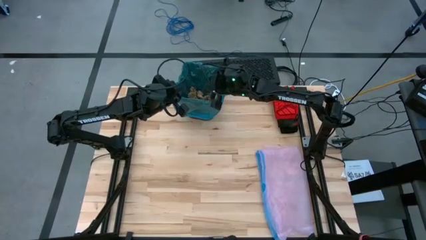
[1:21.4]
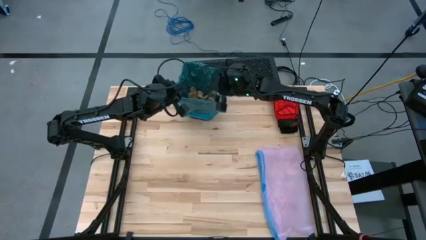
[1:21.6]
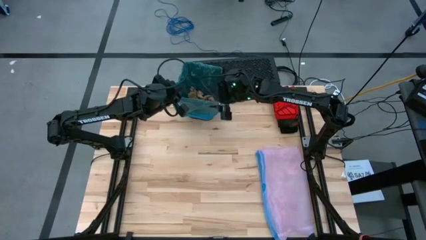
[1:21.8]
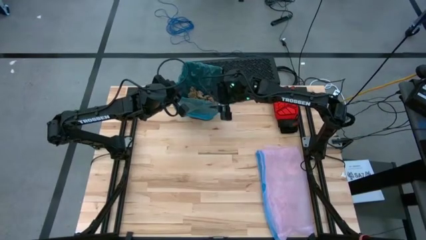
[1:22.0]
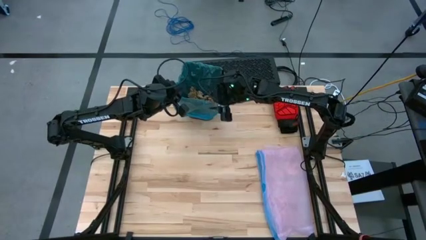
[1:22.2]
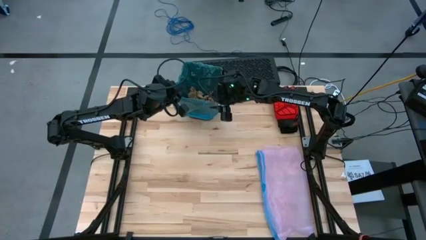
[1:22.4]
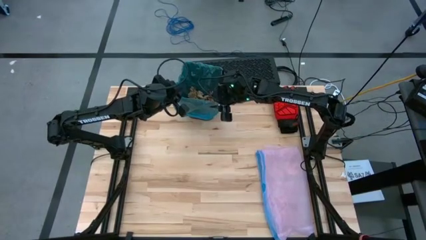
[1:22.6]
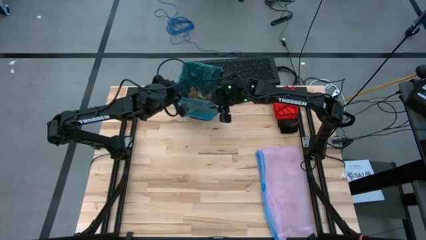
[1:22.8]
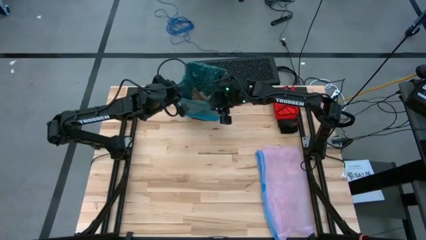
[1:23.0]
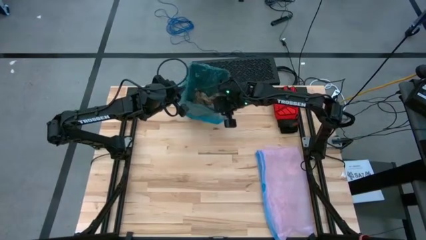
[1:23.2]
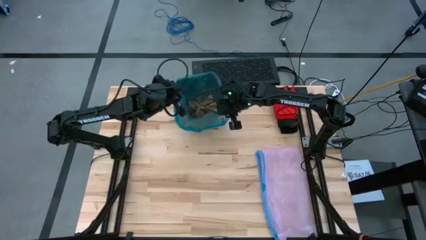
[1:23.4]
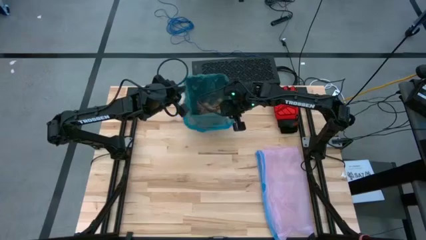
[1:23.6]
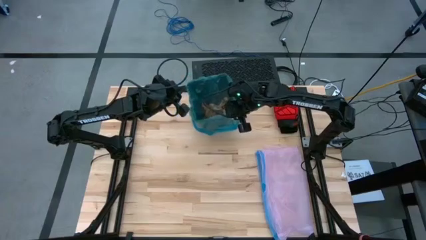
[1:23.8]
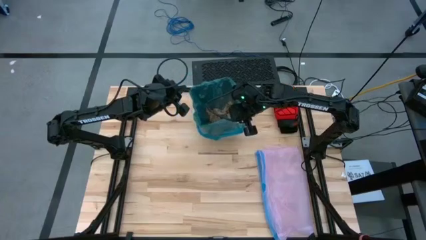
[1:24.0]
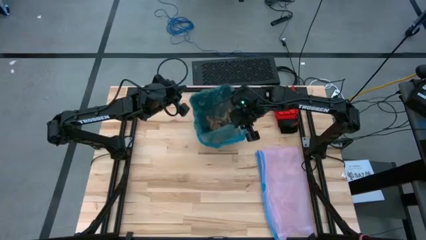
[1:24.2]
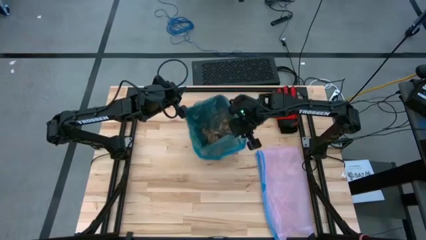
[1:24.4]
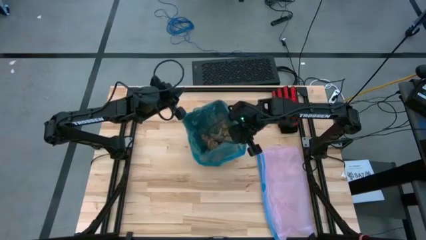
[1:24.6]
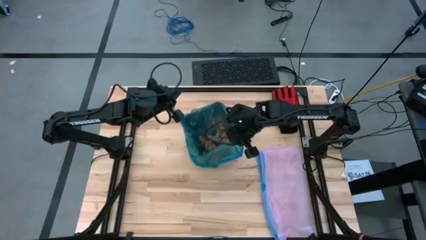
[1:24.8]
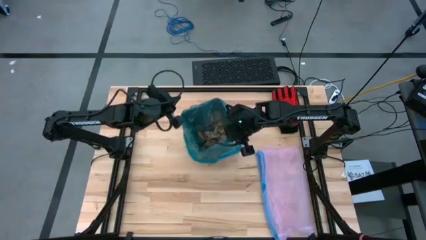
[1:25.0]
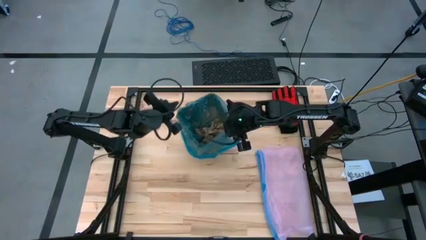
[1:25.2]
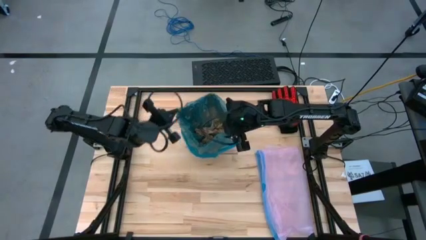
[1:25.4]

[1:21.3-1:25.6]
Task: place trash/remove bag and relplace
Move the black trash bin to the center of the table

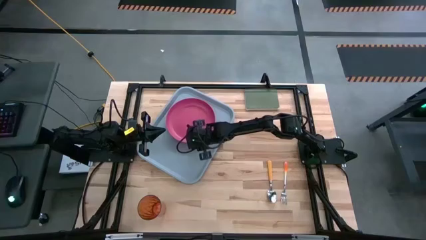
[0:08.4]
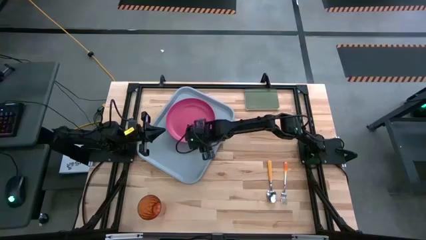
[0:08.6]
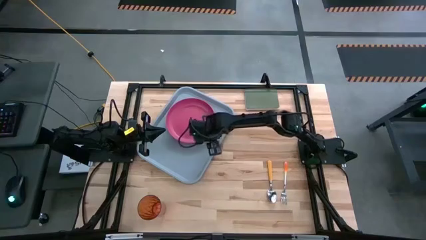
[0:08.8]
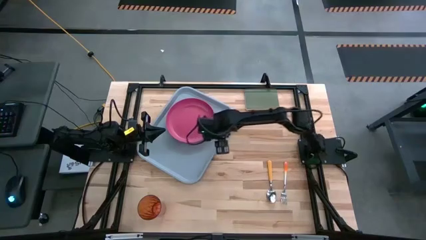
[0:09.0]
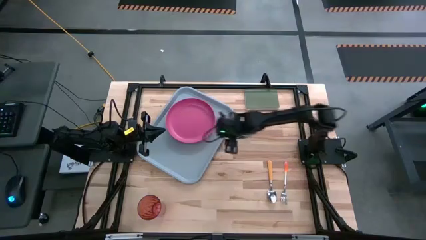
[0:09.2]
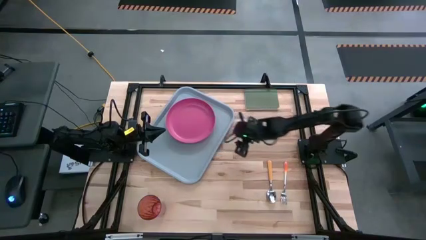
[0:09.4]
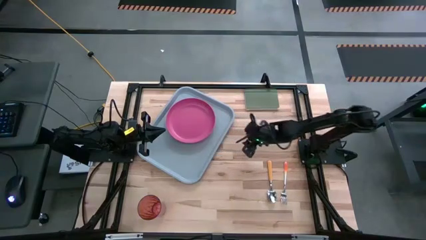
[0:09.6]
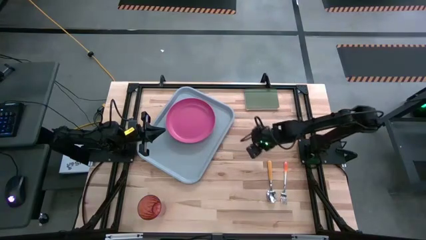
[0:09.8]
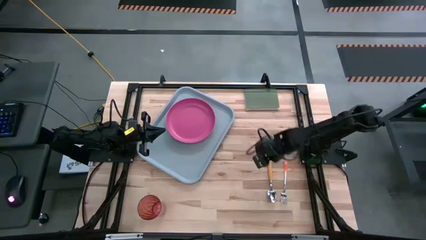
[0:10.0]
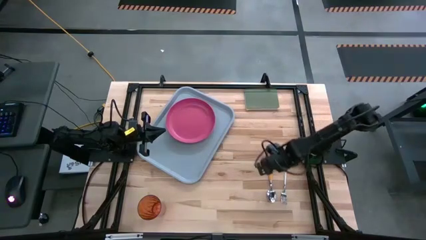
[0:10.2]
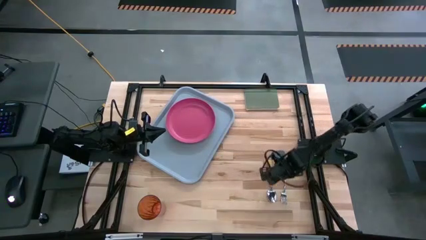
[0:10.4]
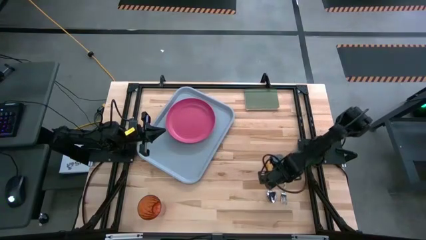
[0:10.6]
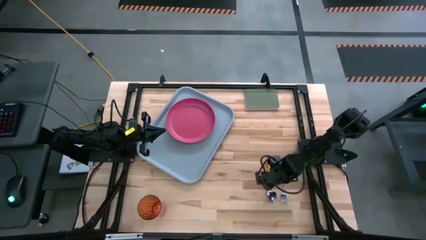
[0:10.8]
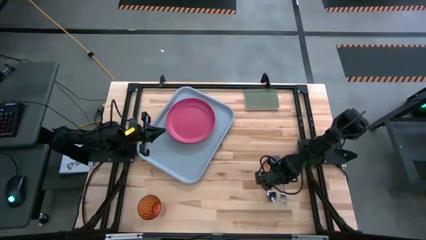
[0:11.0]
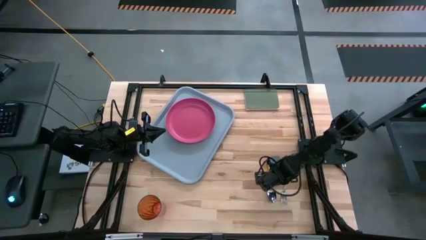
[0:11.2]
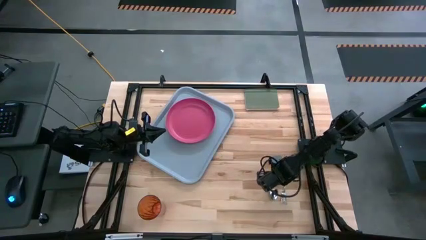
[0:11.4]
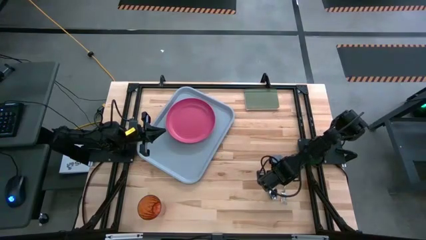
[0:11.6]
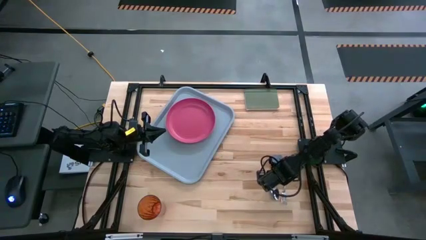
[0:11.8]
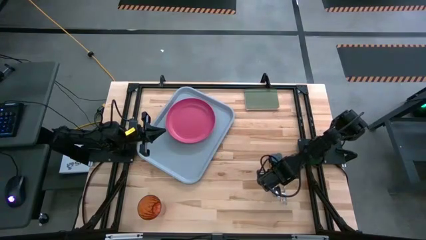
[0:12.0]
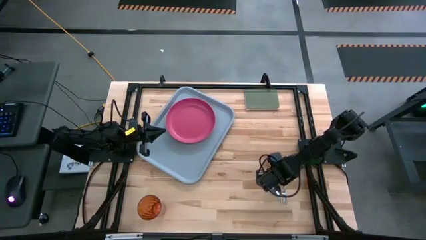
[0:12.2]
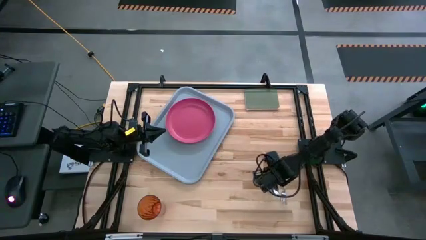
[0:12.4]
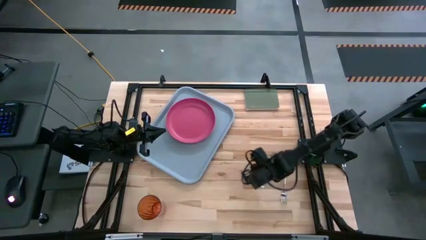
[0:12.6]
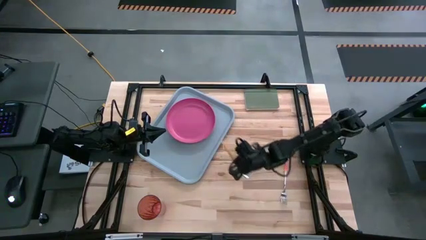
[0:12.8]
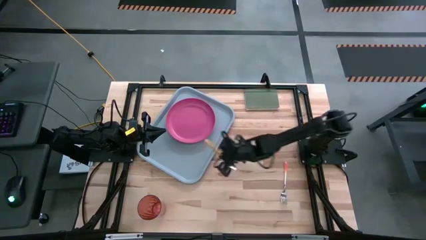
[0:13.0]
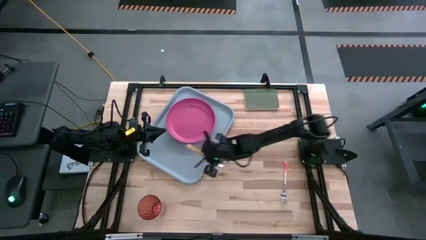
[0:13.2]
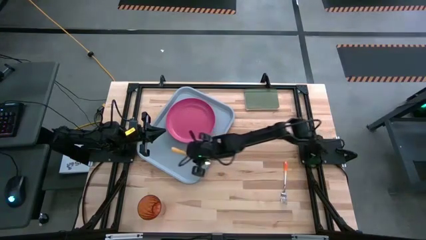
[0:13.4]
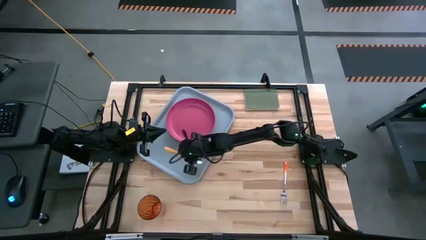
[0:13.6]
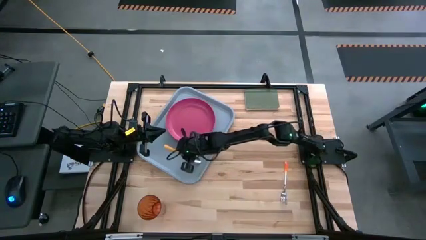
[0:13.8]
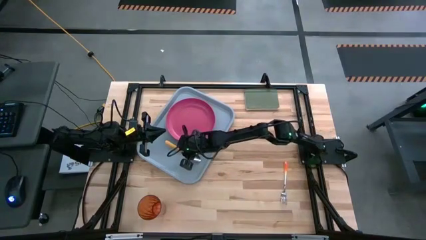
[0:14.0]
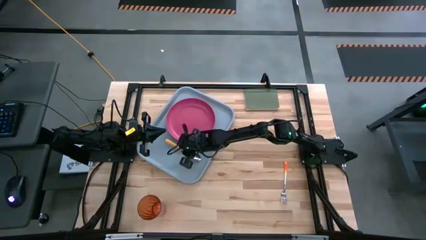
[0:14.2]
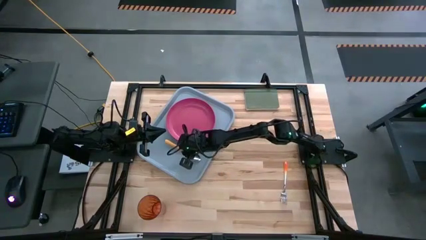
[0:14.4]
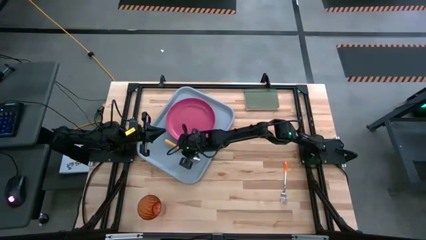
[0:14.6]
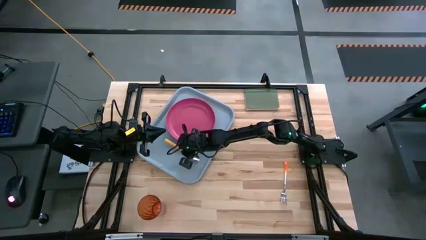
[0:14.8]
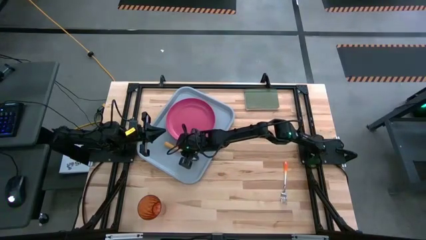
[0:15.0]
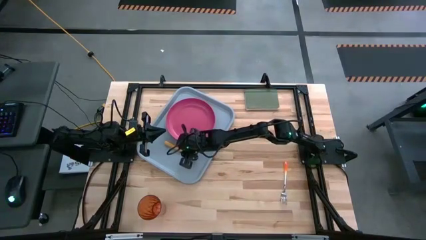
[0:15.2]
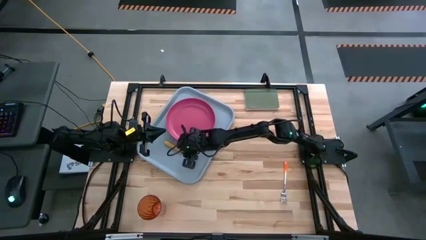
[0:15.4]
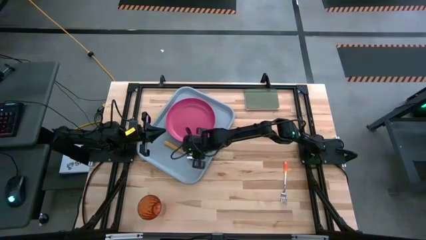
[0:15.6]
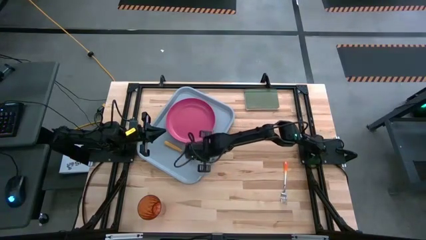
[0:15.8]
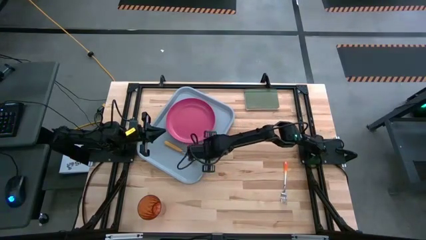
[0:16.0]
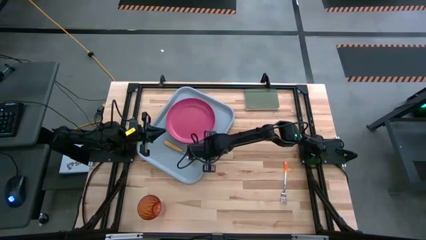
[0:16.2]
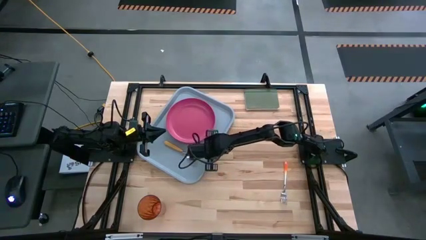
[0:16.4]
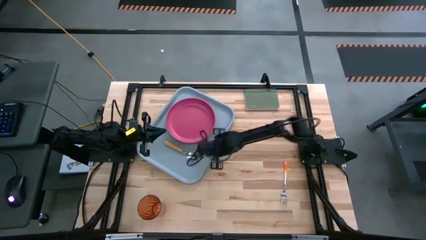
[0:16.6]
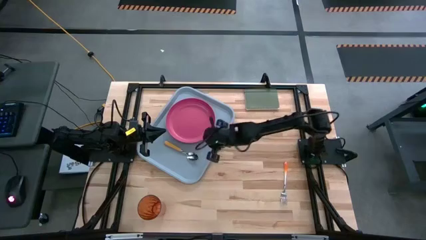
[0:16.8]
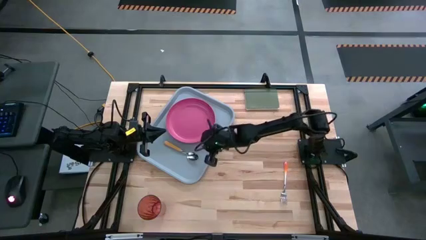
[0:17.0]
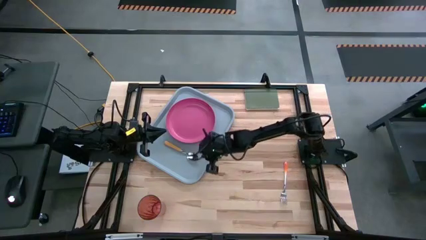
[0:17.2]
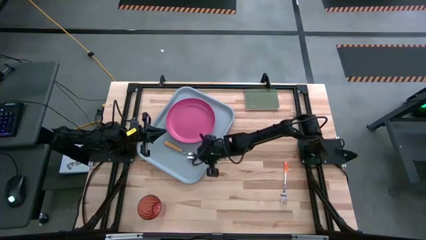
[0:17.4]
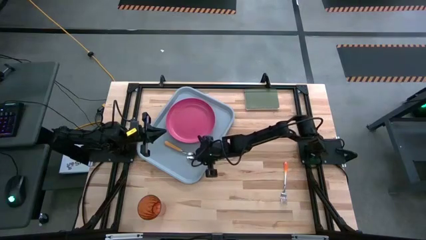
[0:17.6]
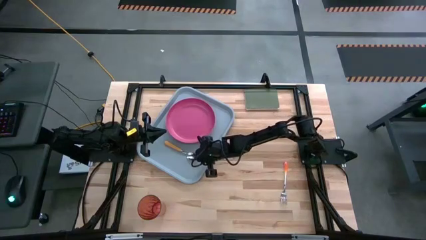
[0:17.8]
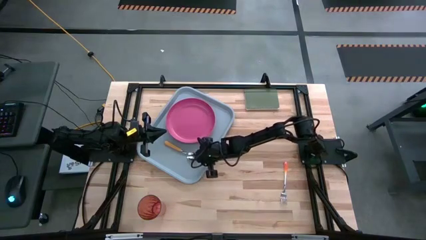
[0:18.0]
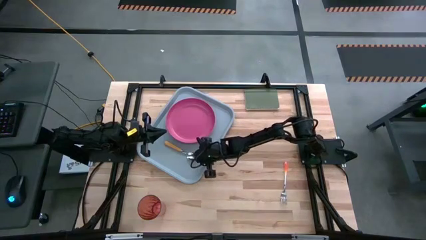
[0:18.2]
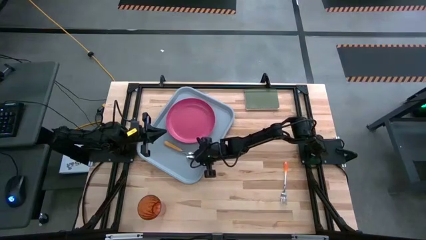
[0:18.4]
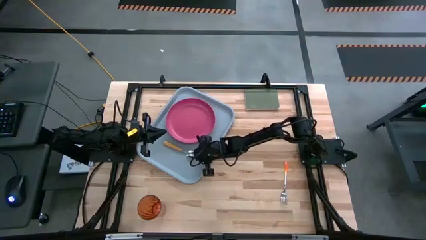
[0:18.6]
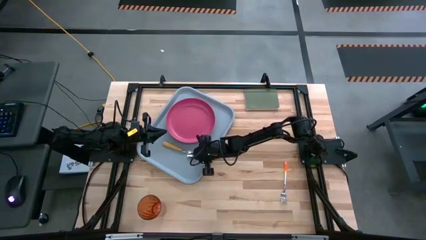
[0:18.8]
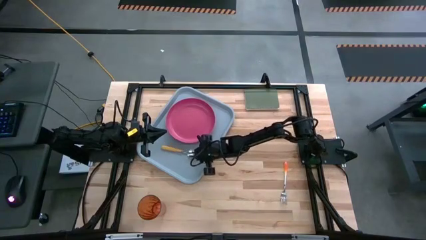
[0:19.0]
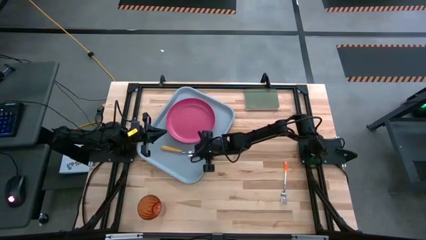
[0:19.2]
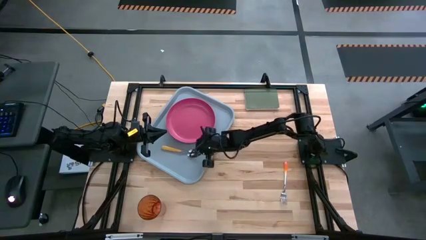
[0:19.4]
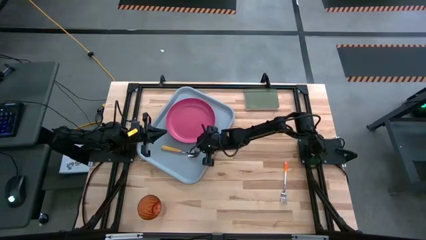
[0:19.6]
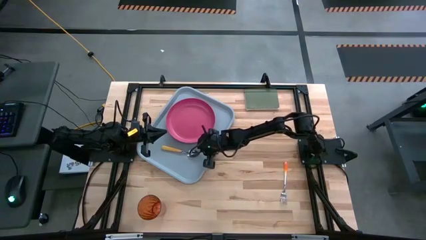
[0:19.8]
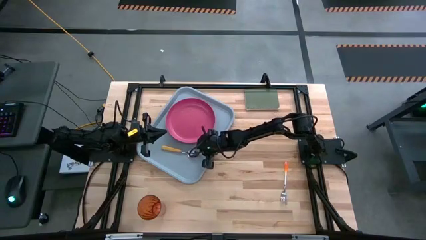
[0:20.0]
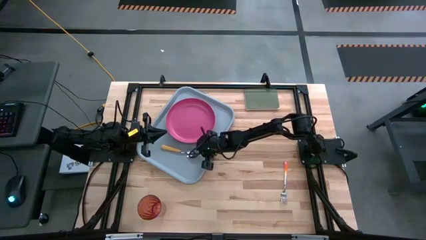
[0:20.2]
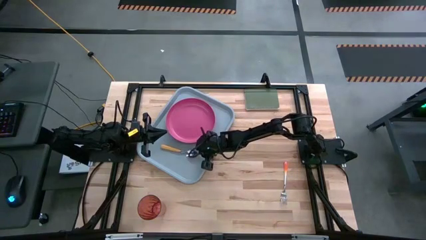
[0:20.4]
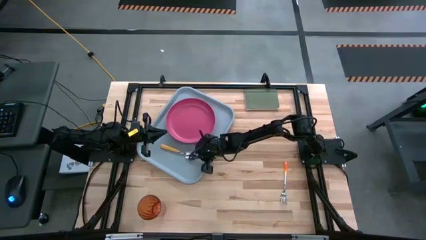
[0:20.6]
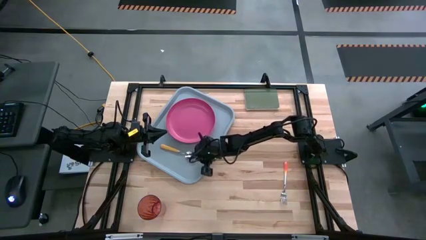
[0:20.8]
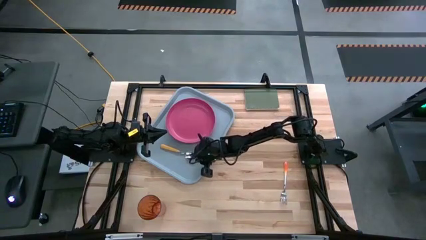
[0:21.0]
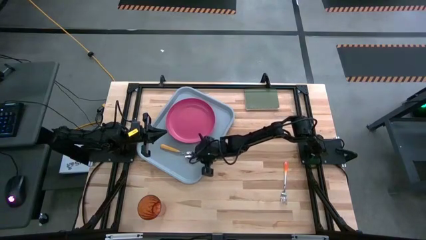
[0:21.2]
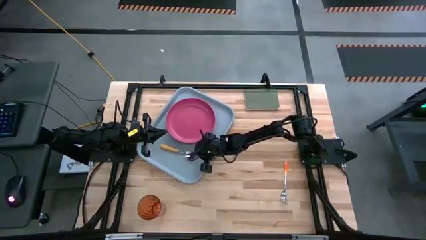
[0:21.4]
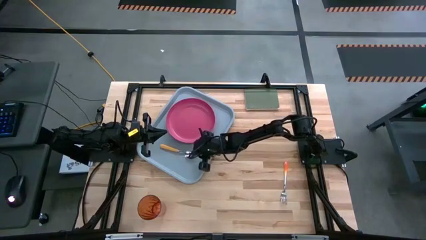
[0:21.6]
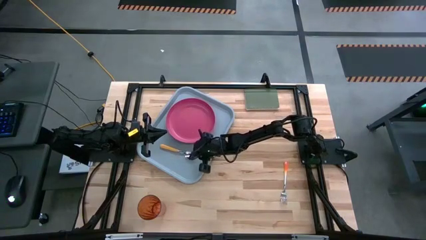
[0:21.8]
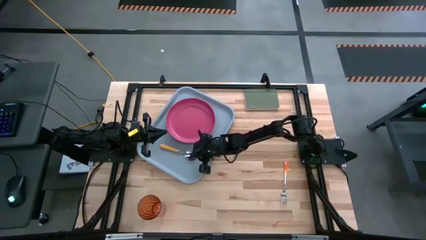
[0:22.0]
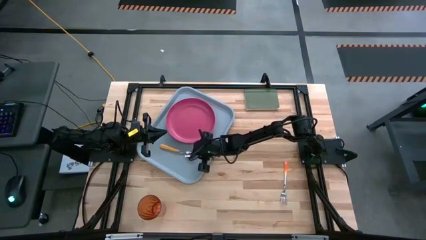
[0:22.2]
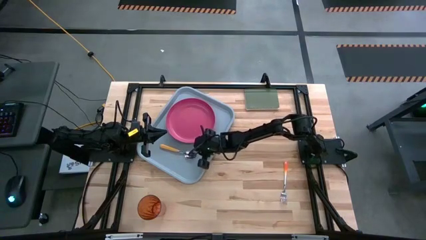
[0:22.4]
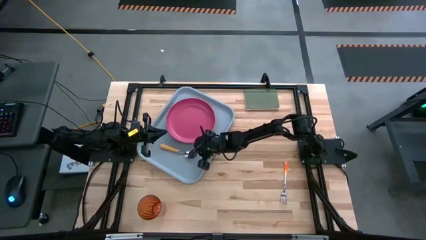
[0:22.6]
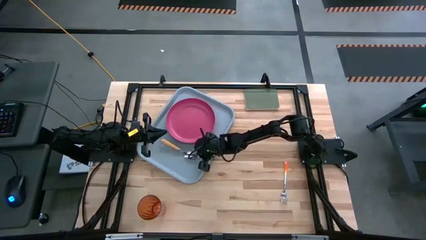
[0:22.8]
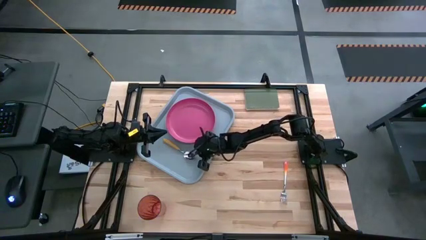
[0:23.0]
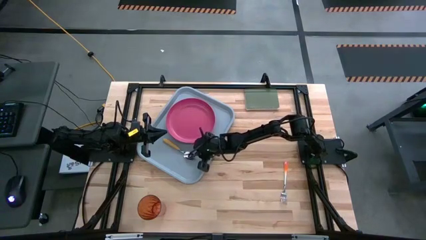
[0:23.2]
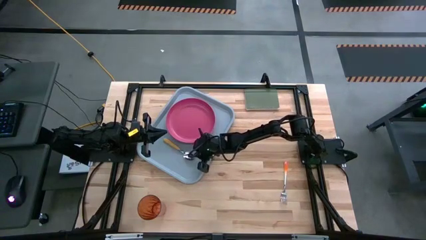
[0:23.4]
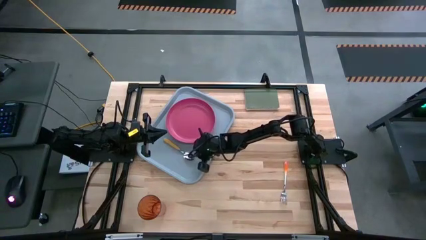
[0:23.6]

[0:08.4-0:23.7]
Task: Pick and place plate/cup/fork/spoon on tray
Put the yellow spoon on the grey tray to the bottom of the pink plate
